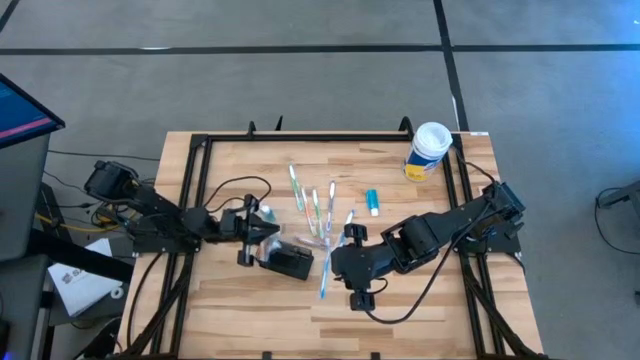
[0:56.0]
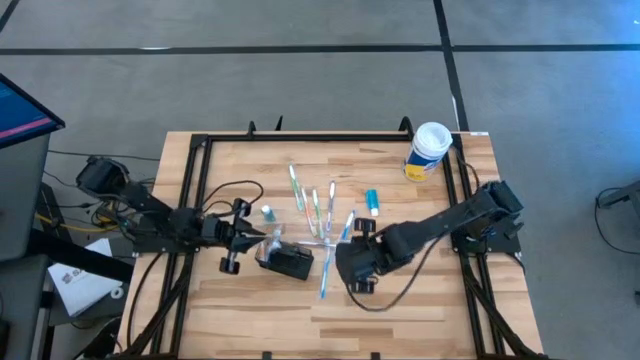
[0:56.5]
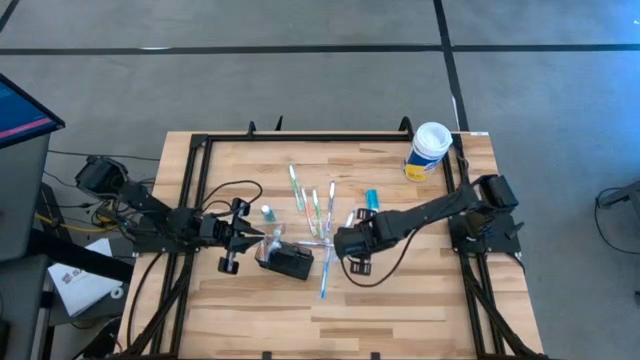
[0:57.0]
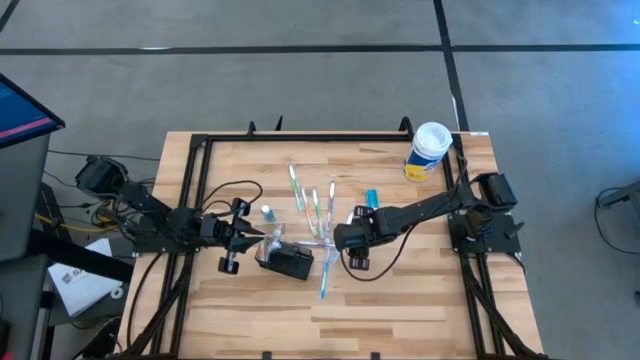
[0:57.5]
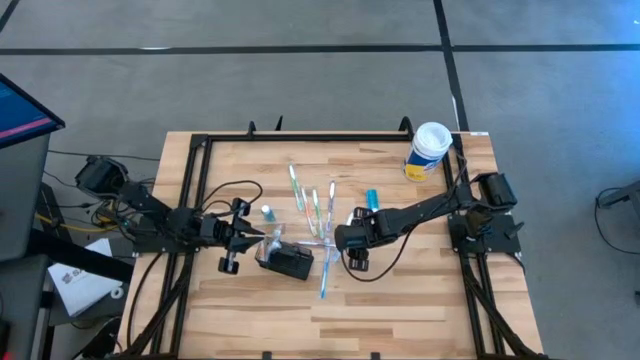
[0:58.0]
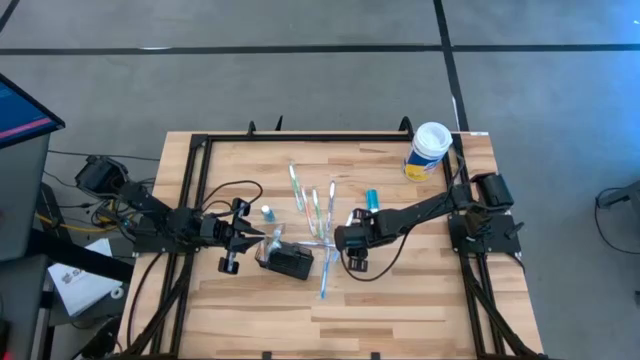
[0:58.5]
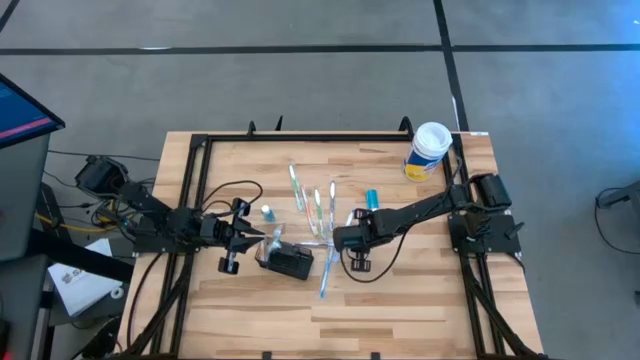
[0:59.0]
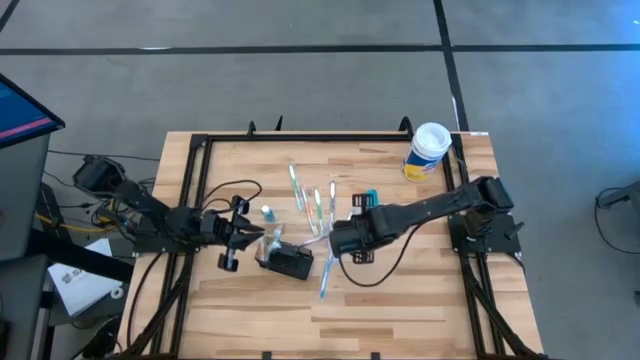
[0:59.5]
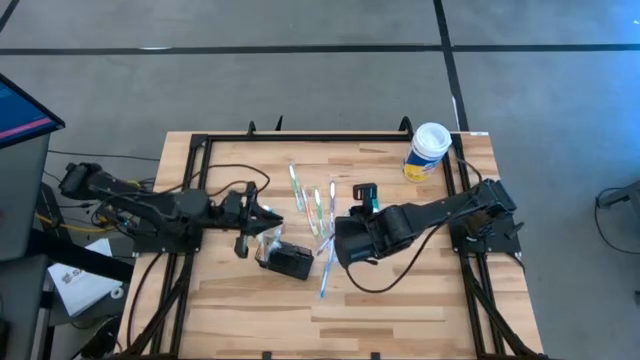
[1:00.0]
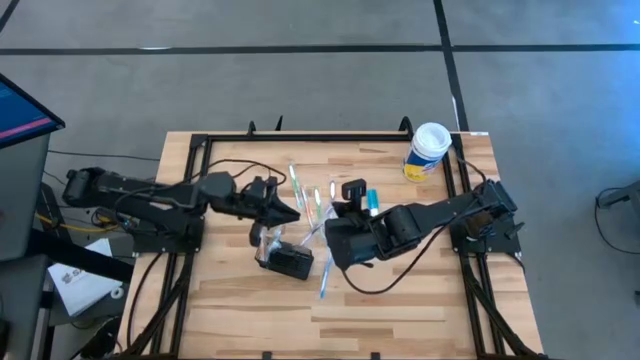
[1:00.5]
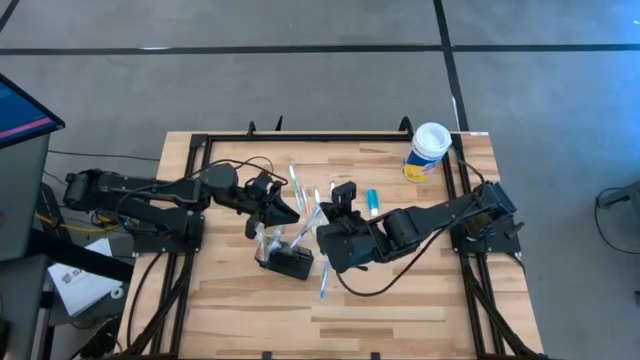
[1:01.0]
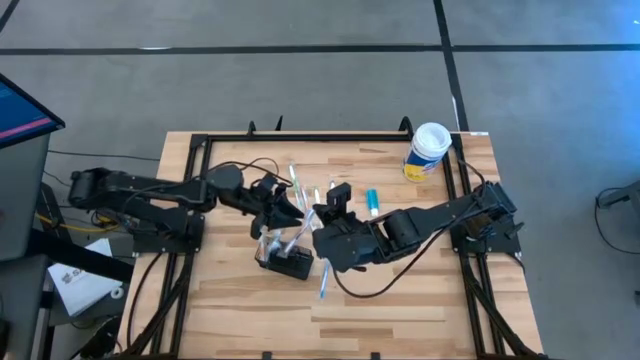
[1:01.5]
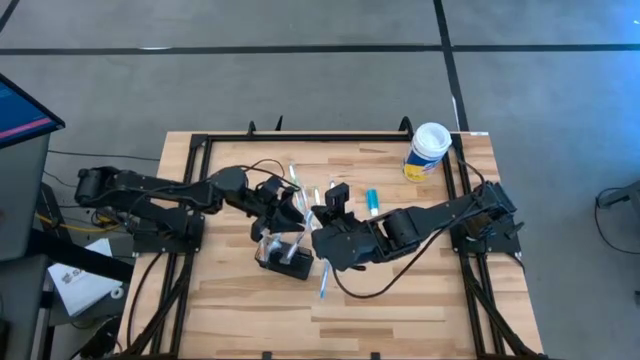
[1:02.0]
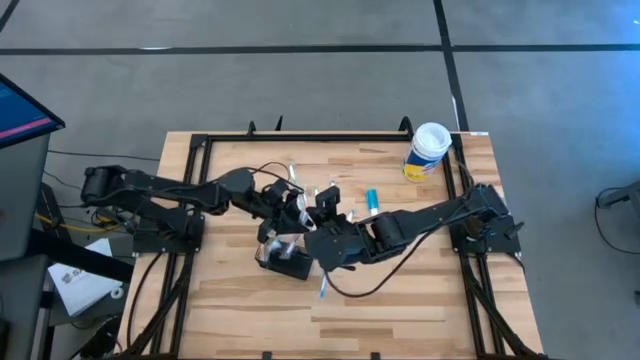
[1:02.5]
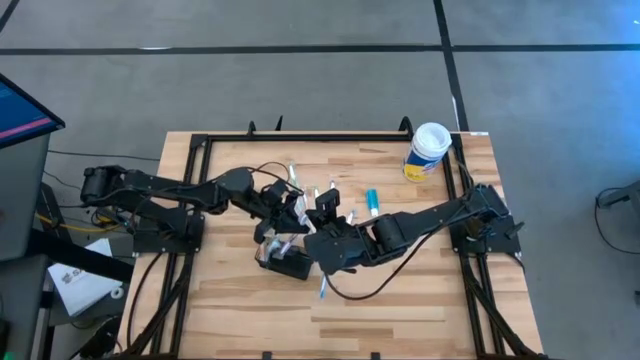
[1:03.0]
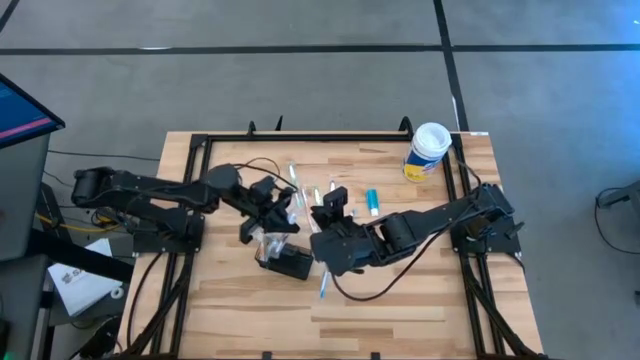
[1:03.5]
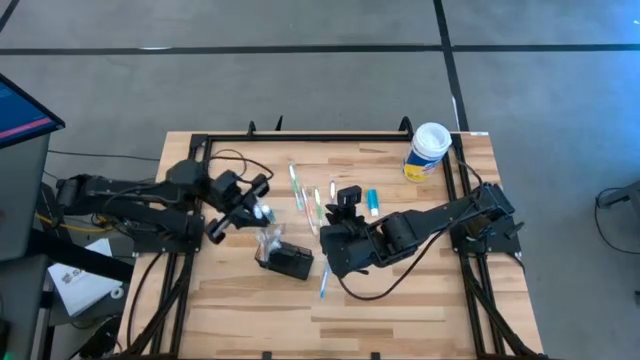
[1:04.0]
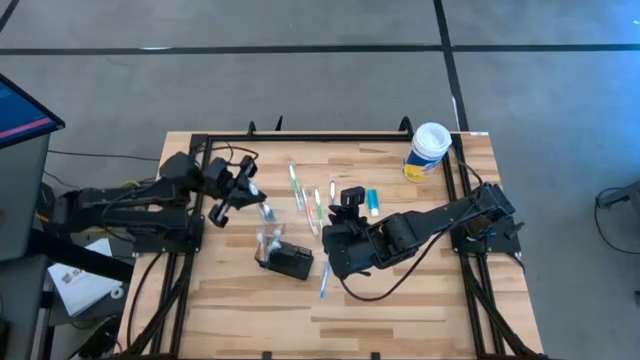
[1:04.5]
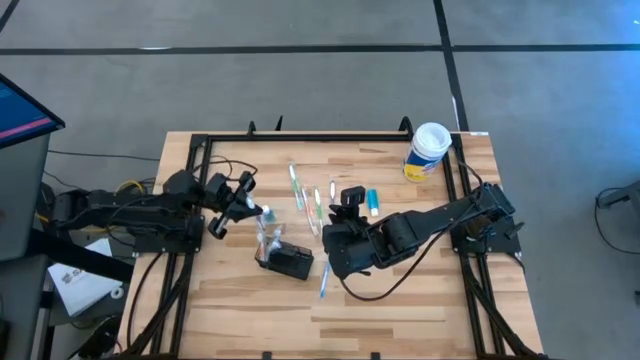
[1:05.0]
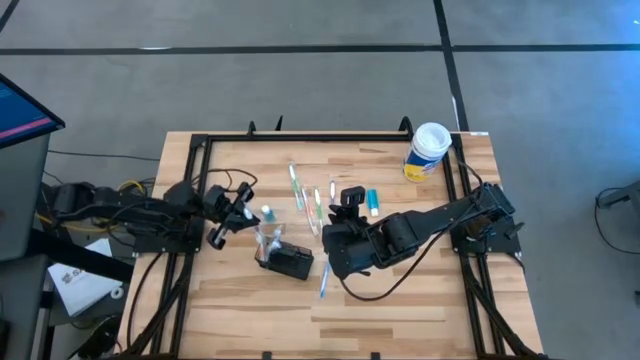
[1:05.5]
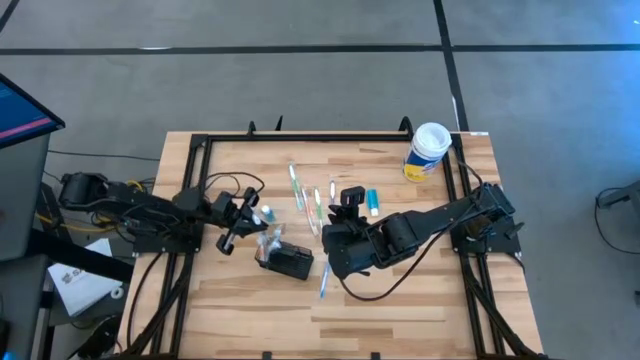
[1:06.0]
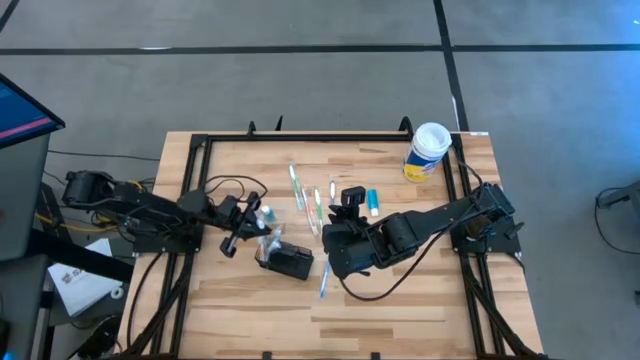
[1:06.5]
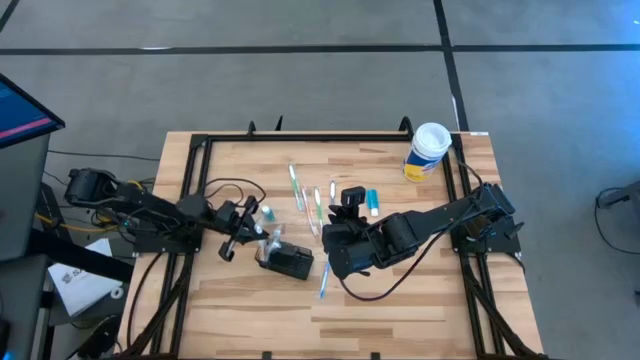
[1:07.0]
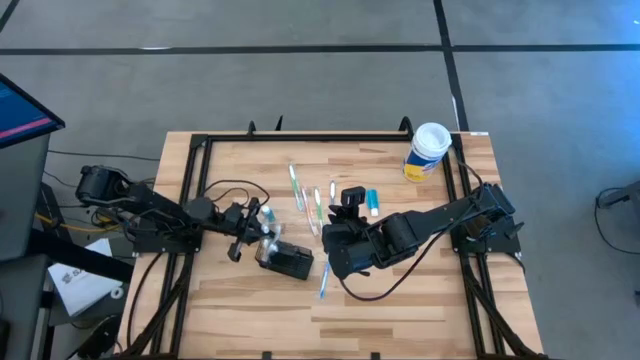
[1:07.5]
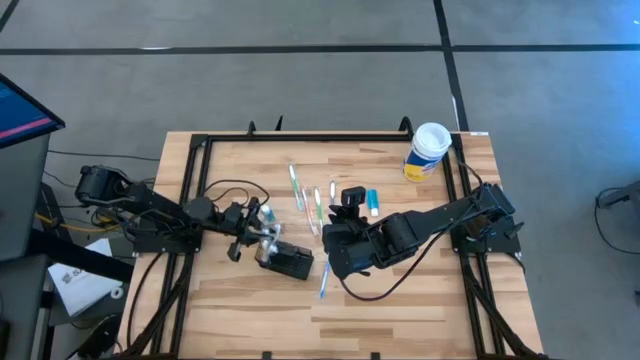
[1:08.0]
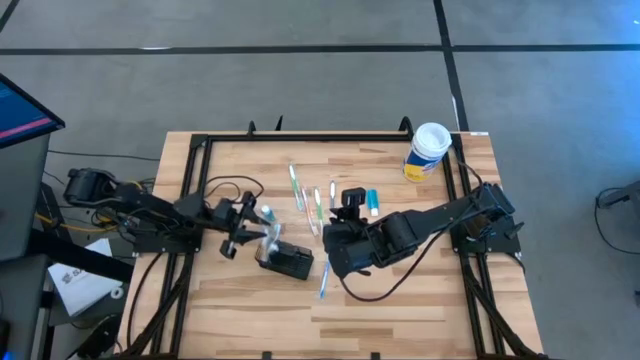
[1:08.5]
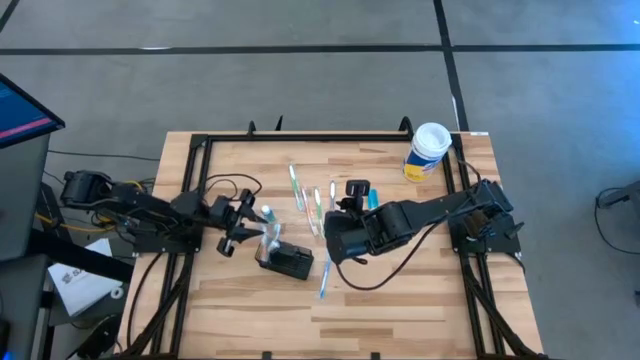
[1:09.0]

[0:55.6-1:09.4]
Task: Pick & Place toothbrushing station
Put the bottom purple toothbrush into the wire organizer

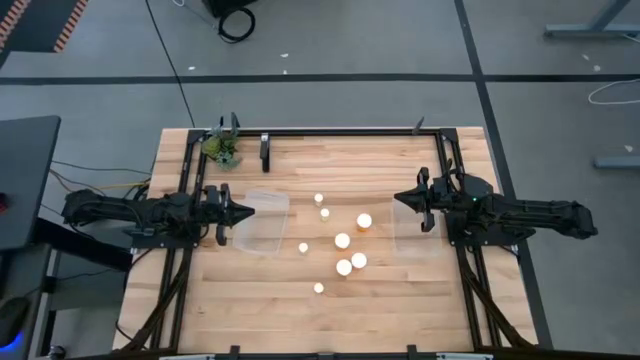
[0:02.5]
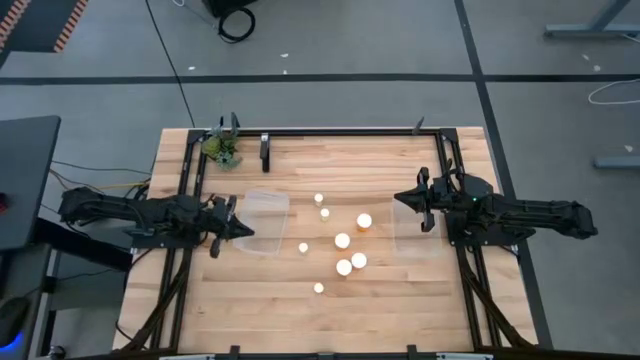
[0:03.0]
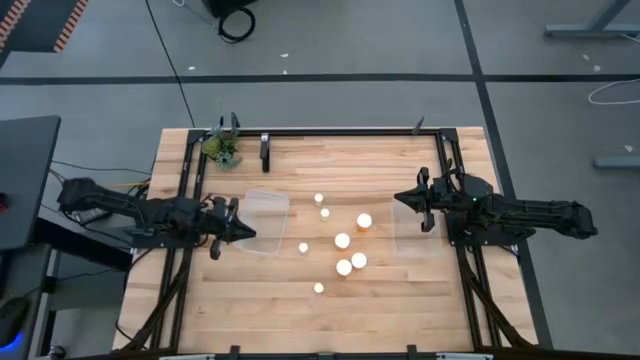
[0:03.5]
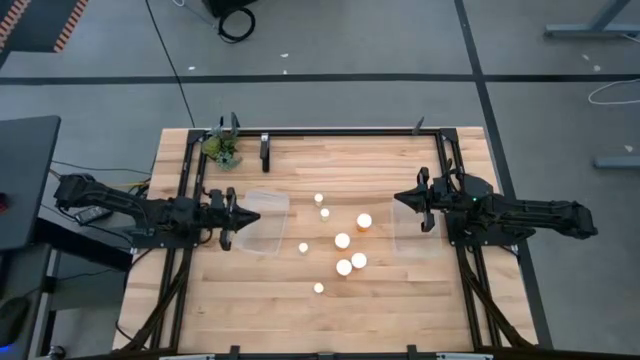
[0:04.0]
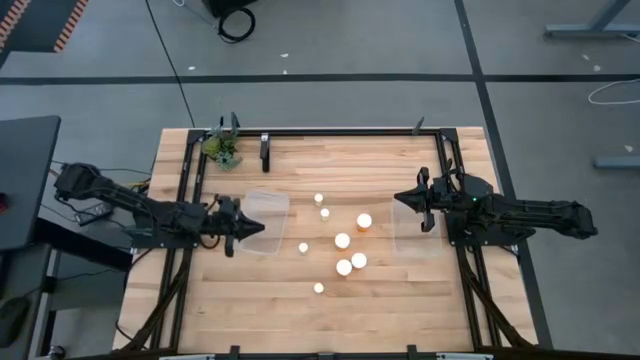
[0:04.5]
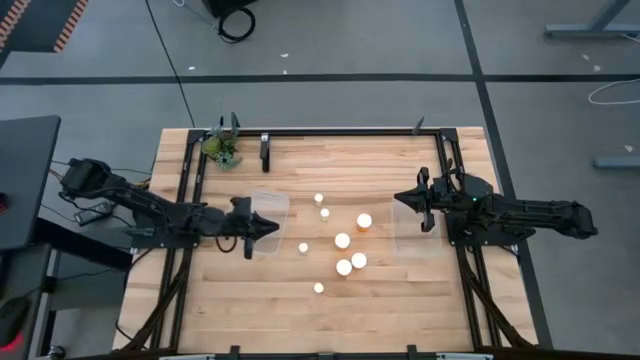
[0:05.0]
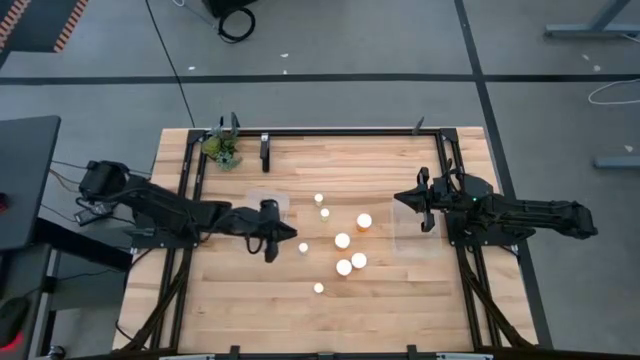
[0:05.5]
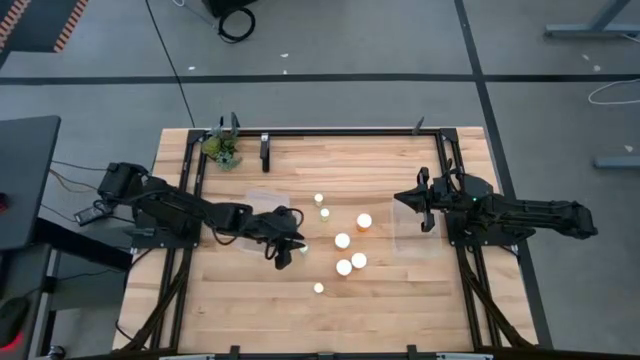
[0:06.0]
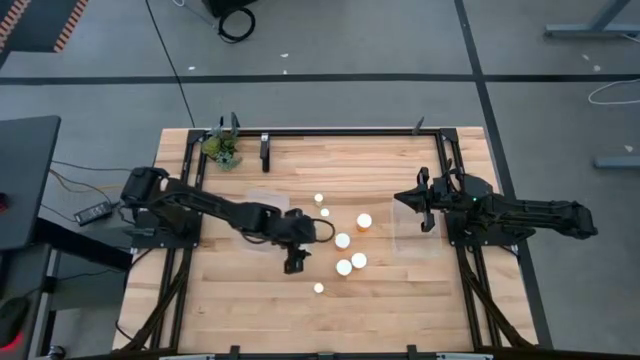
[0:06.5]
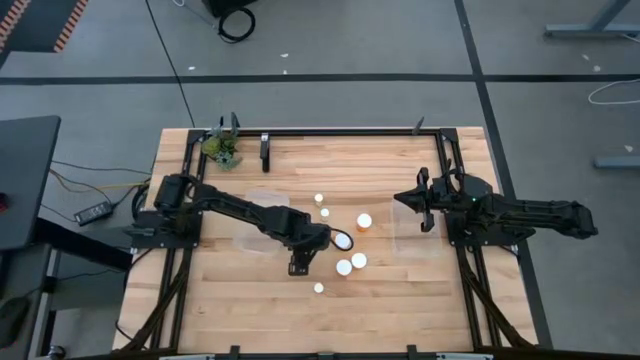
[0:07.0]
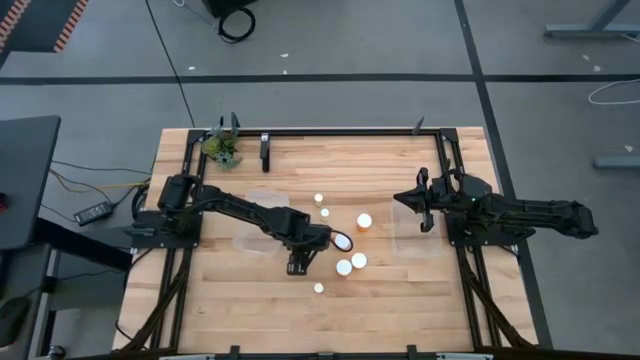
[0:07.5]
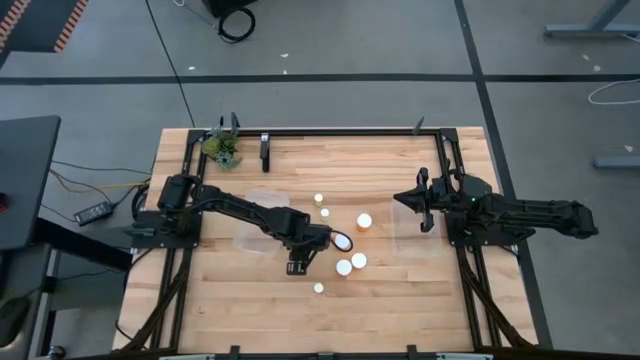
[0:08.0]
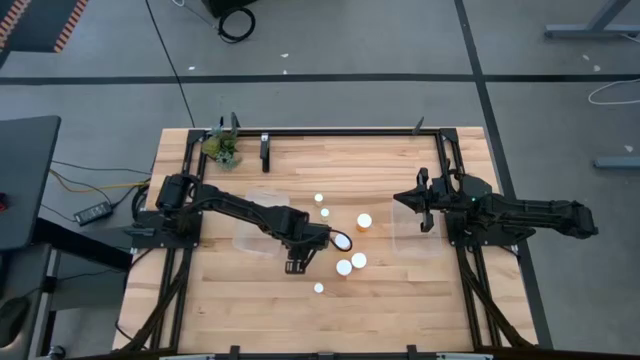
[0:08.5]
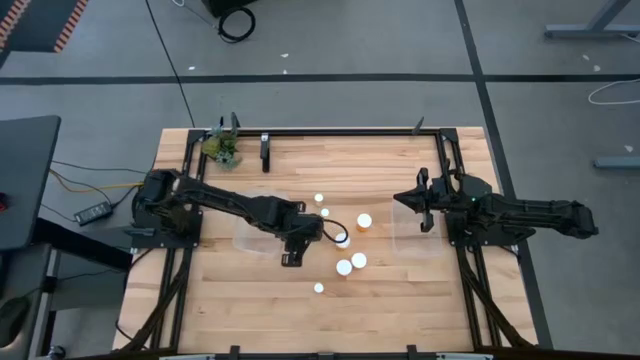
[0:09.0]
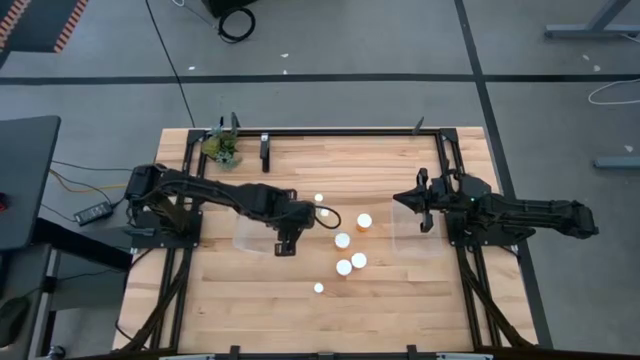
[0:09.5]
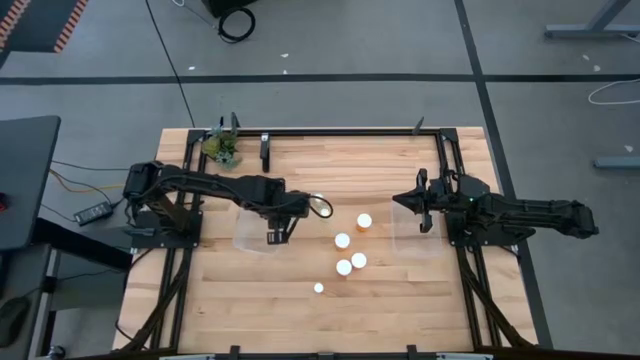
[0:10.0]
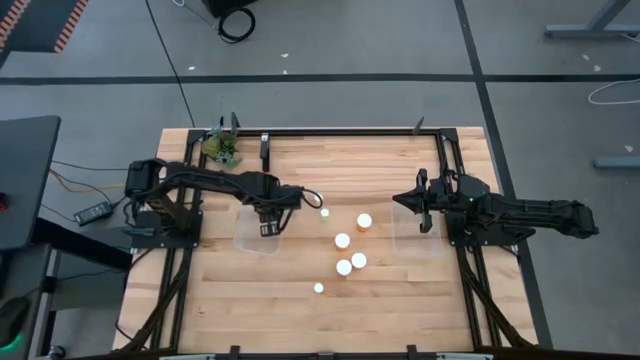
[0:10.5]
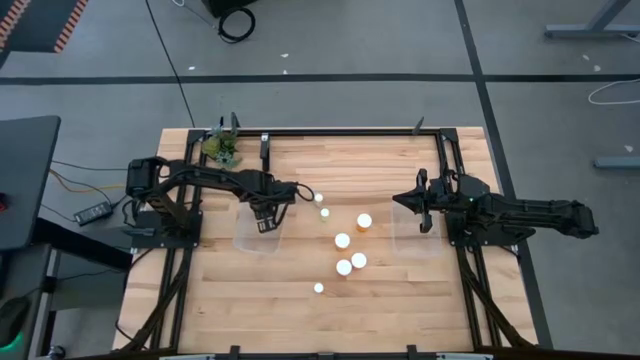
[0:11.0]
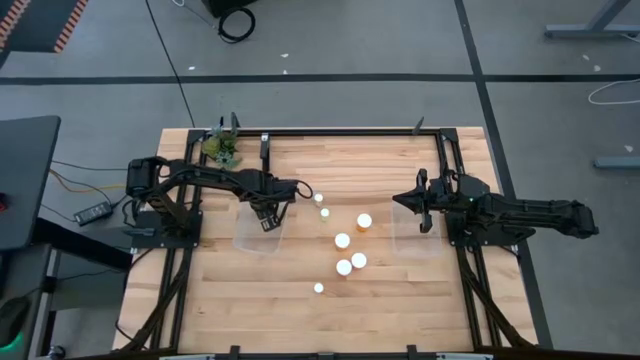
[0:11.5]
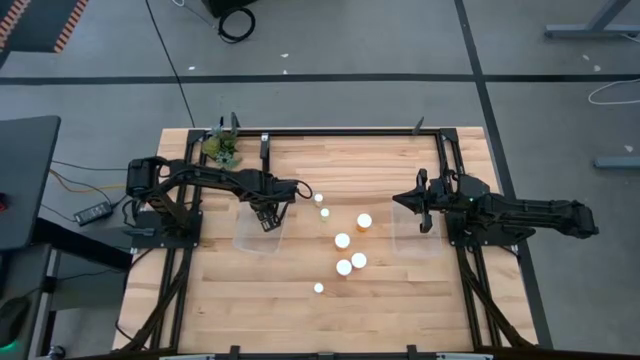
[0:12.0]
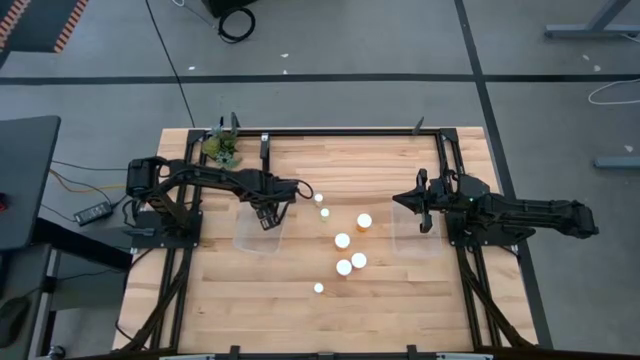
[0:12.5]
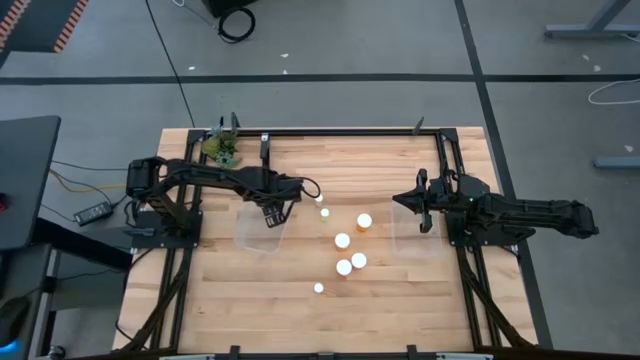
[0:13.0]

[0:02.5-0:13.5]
Task: Pick and place medicine bottles into bin by pill shape (circle, oval)
Put the yellow tablet bottle into the left transparent bin
